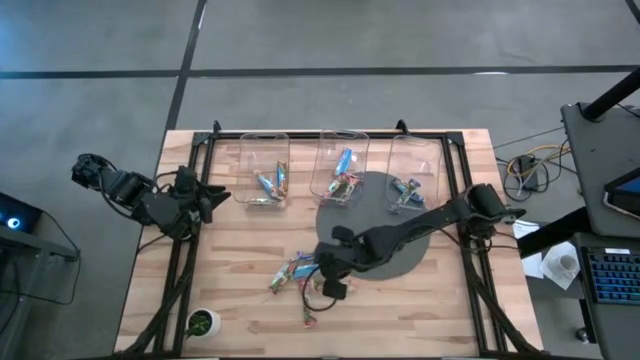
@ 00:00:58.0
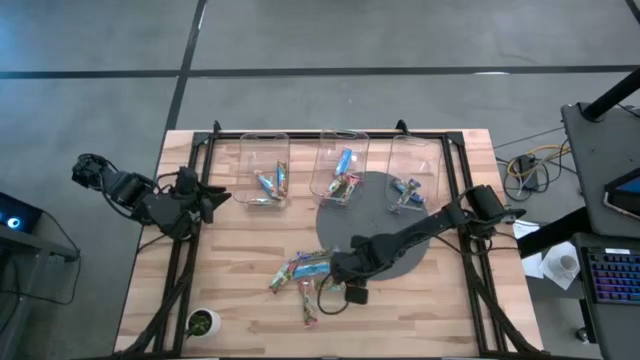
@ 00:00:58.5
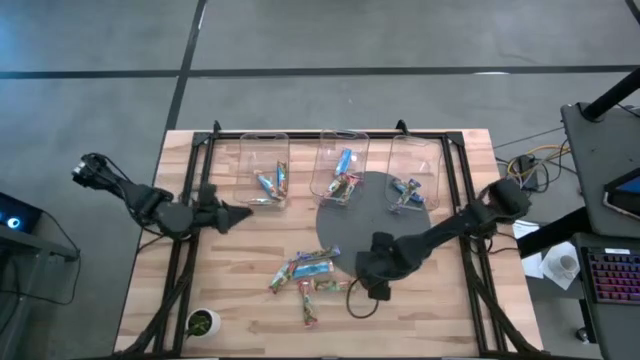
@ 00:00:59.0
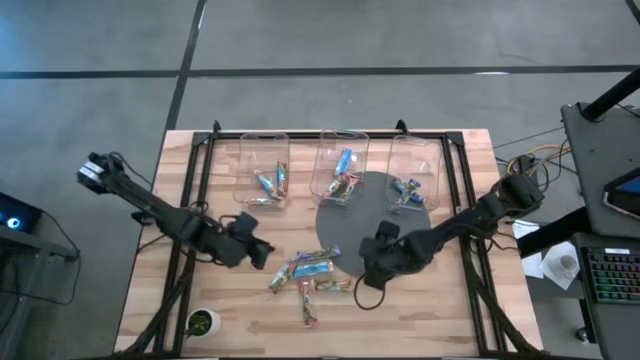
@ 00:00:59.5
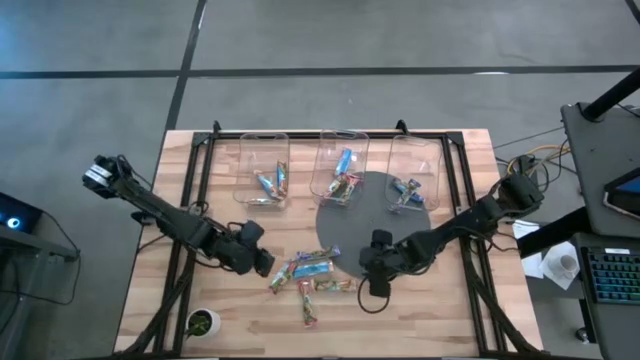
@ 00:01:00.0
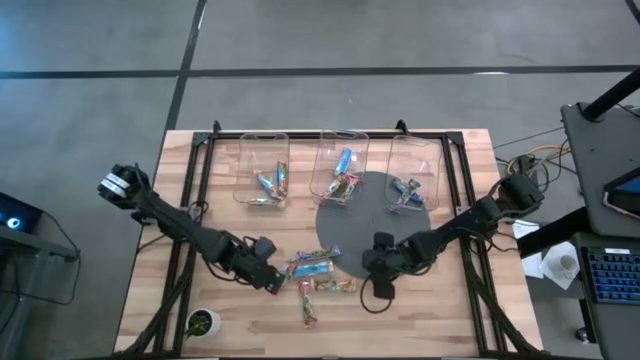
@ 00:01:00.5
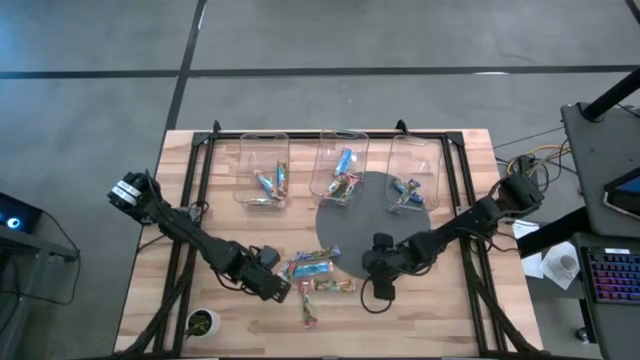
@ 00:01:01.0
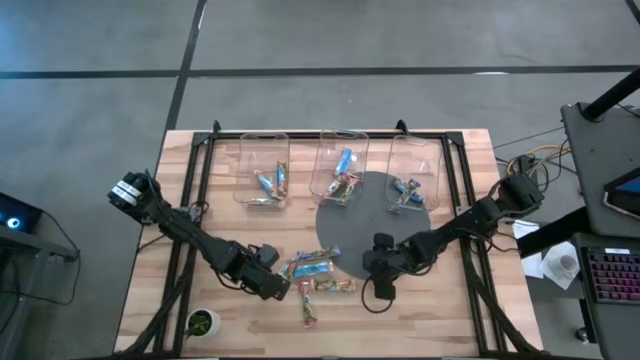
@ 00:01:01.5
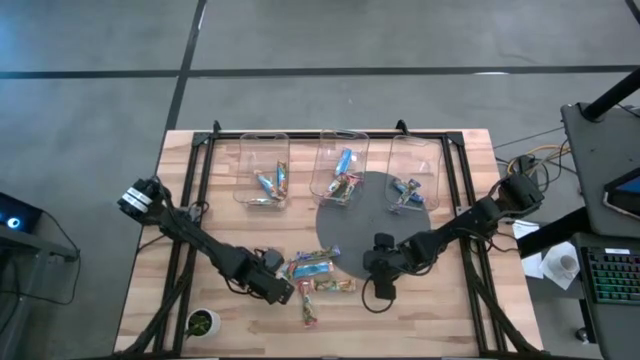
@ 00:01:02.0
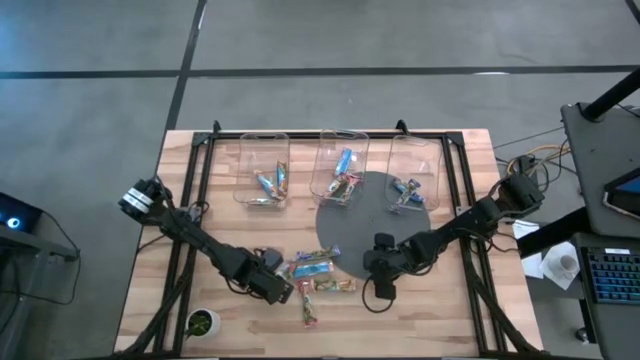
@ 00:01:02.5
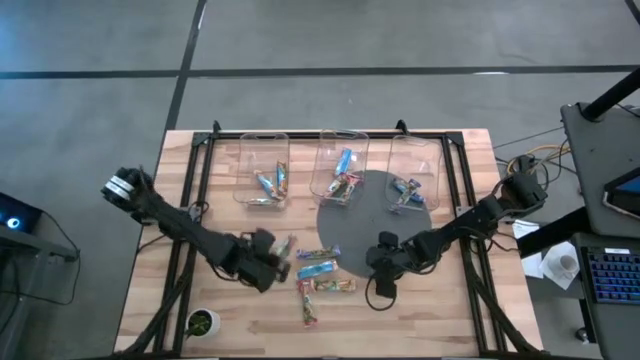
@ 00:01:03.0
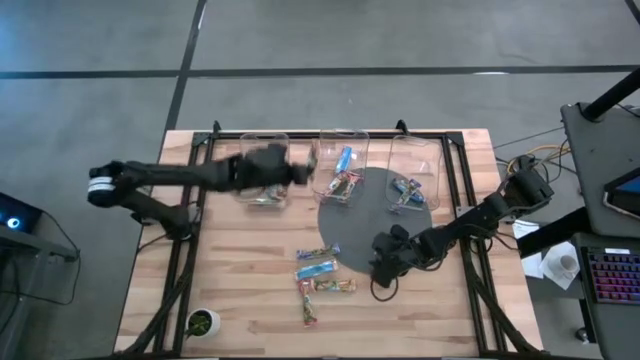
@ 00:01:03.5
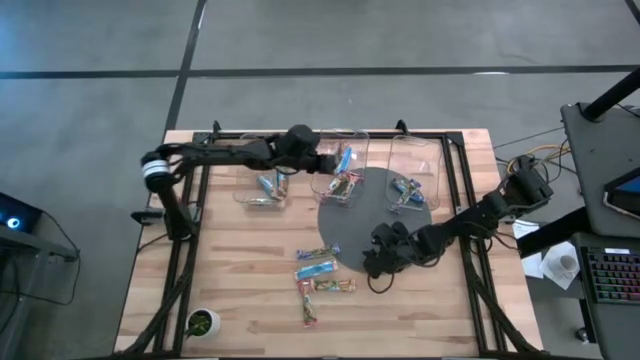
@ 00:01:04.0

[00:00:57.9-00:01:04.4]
Task: Pick and place Granola Bars by type
Put the red granola bar into the middle transparent bin

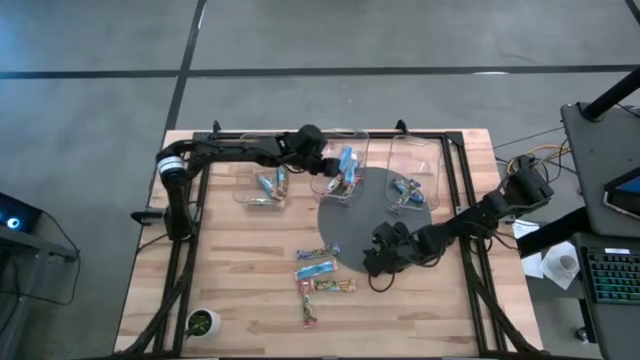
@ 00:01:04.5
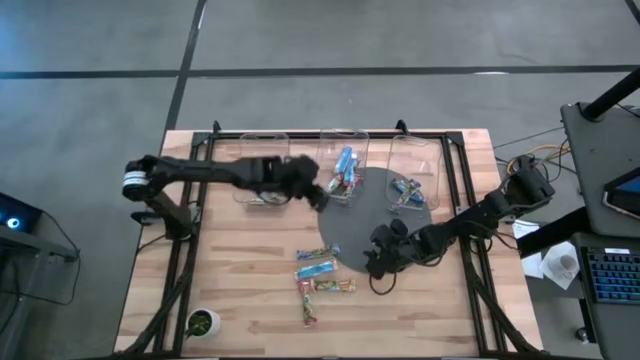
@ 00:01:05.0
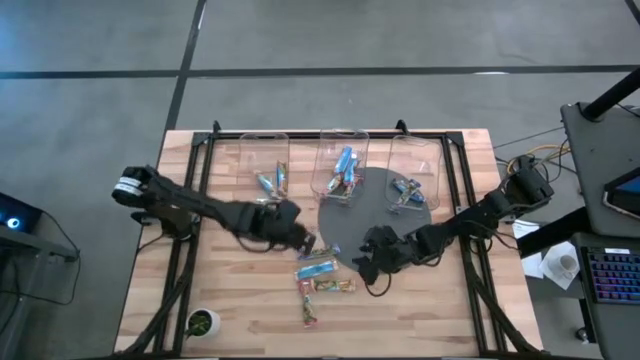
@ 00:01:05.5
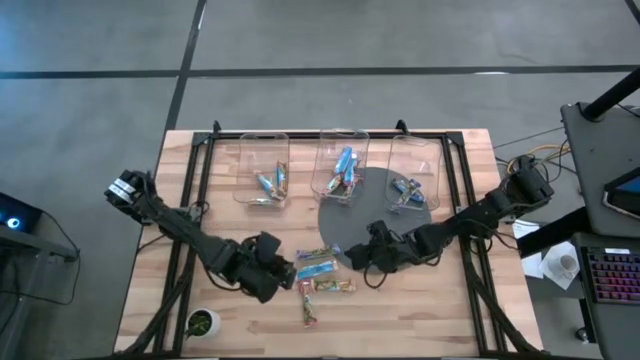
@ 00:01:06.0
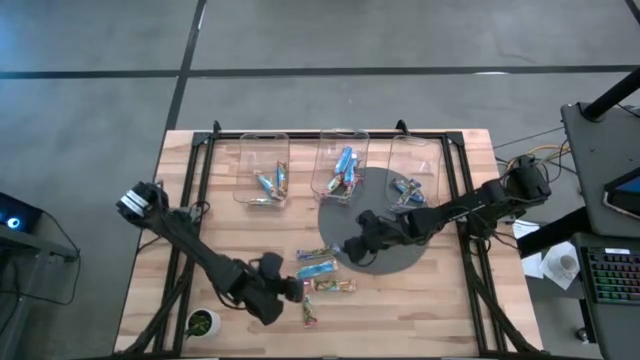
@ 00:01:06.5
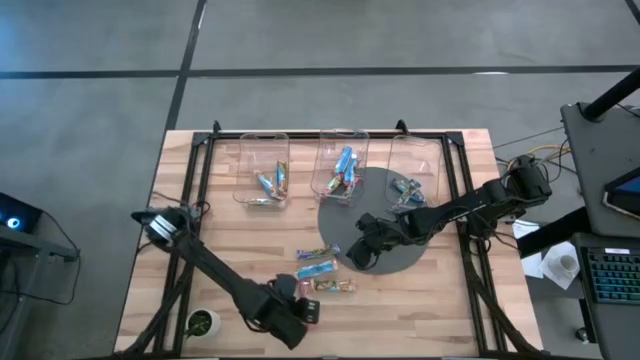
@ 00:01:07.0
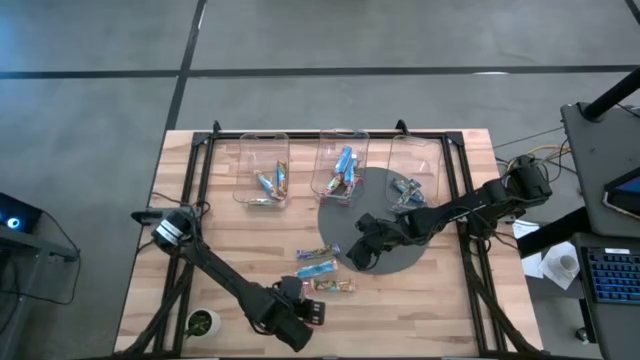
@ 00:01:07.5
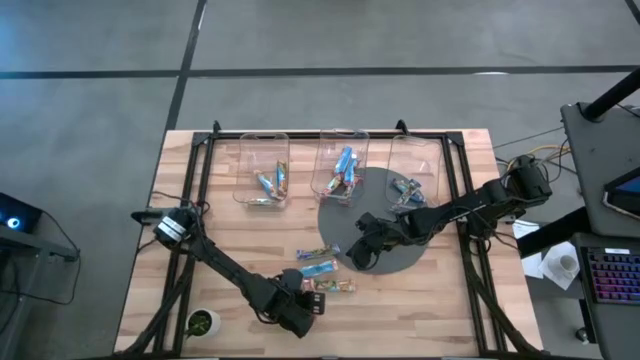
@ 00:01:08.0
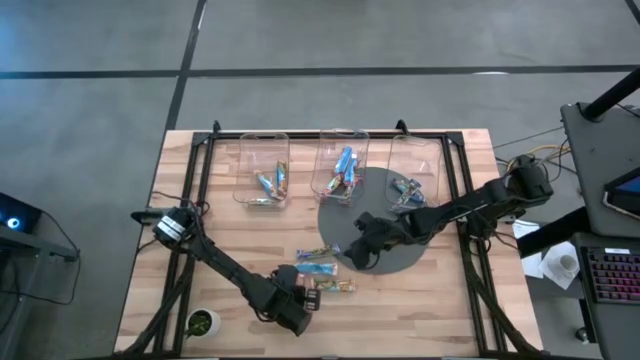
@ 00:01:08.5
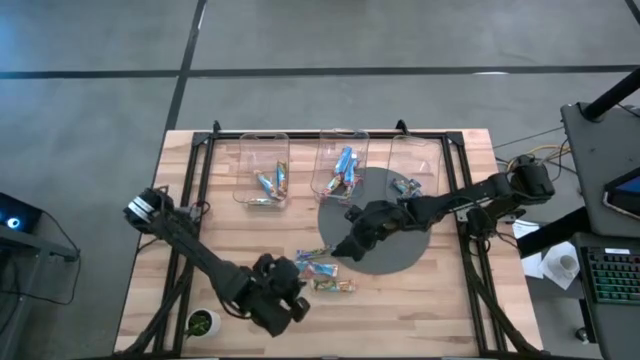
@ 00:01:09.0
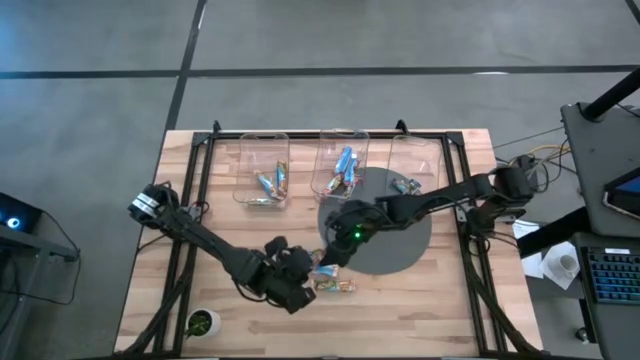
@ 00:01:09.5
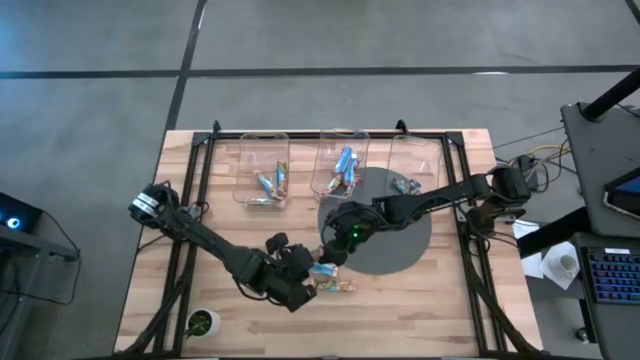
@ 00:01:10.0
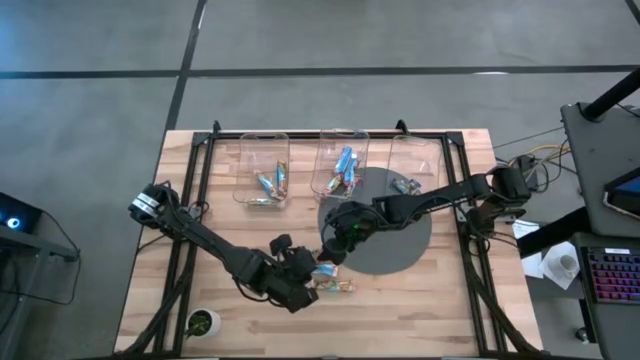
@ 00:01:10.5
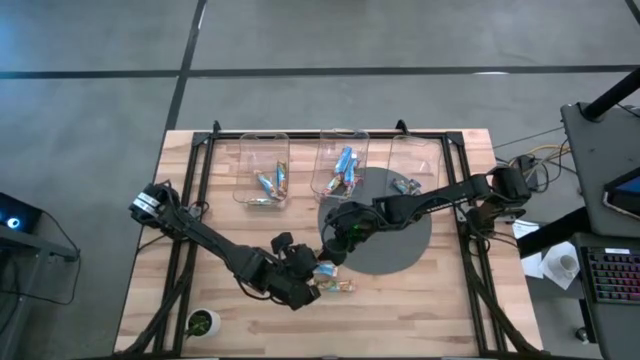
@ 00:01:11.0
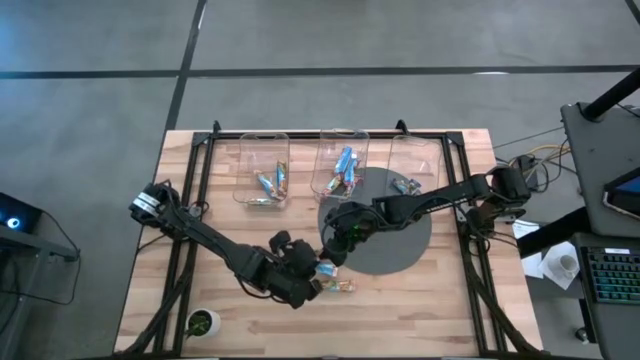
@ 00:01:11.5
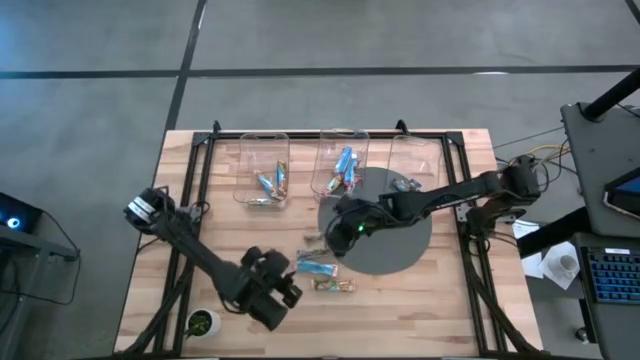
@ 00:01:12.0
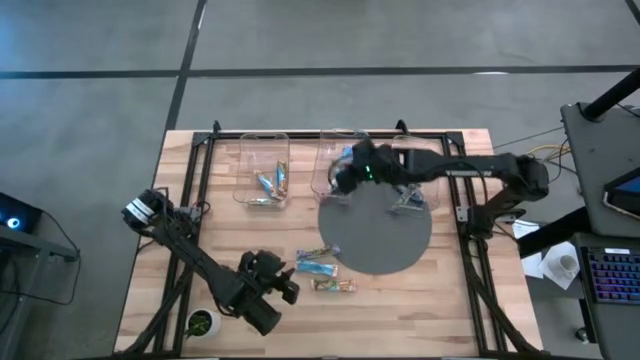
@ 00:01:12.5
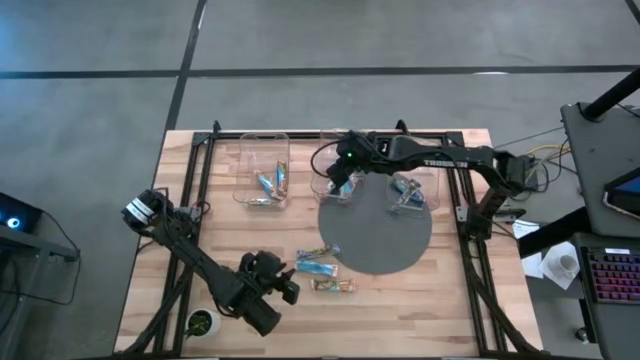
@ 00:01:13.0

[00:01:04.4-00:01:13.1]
Put the red granola bar into the middle transparent bin

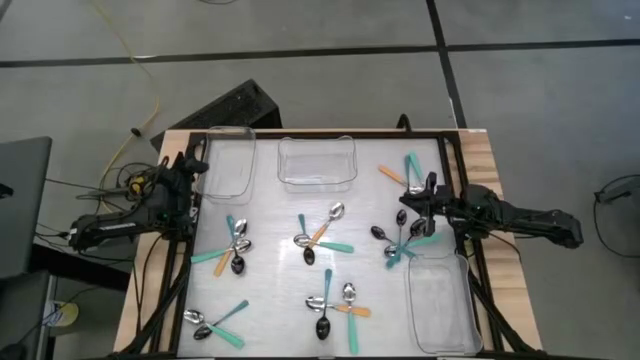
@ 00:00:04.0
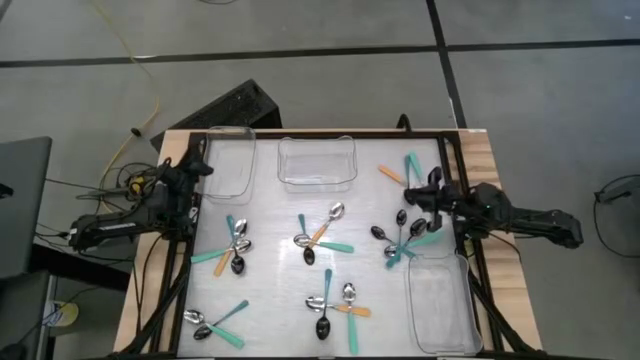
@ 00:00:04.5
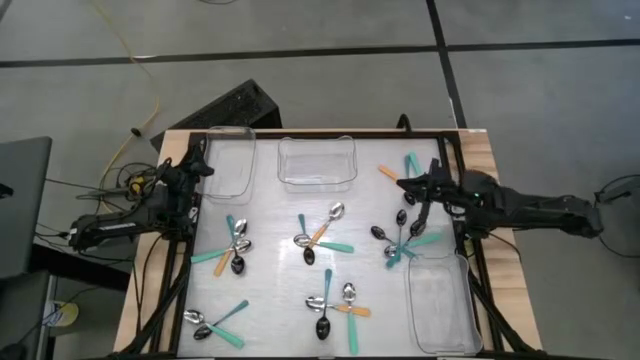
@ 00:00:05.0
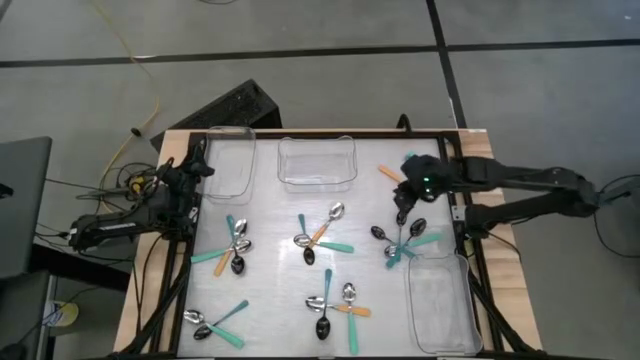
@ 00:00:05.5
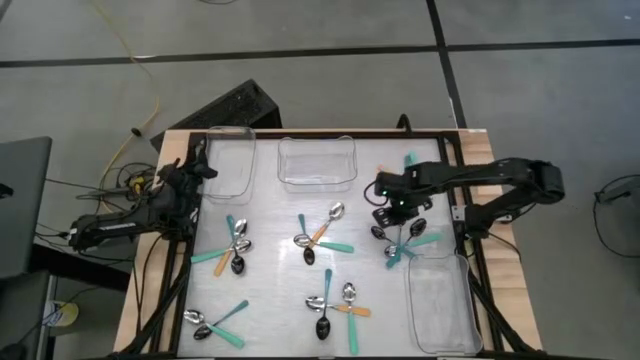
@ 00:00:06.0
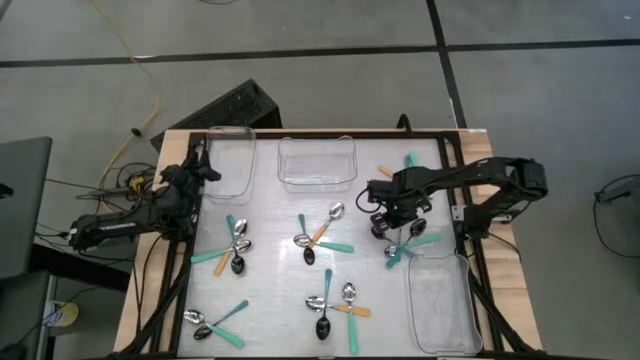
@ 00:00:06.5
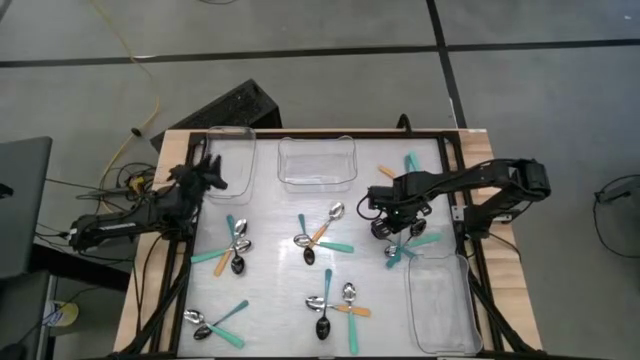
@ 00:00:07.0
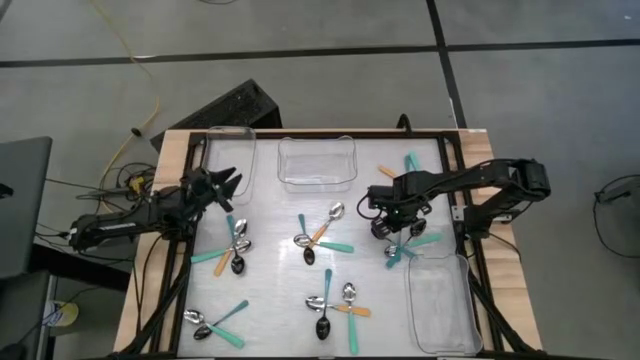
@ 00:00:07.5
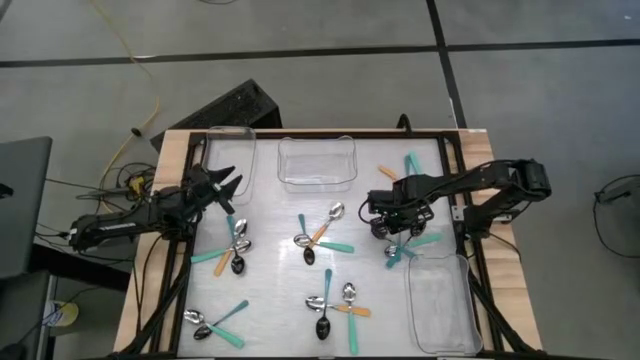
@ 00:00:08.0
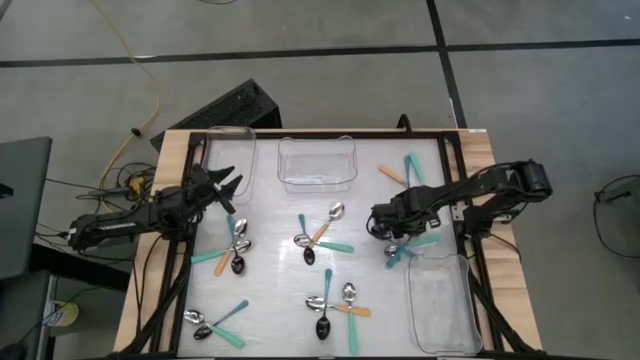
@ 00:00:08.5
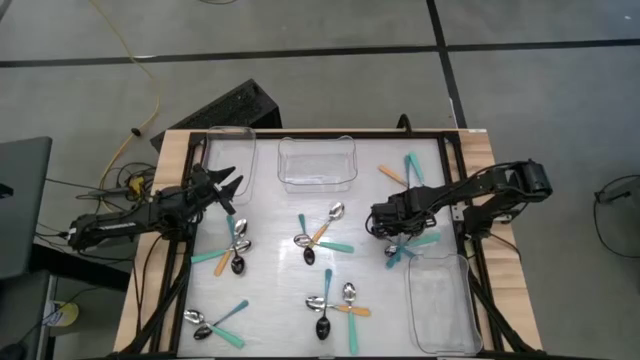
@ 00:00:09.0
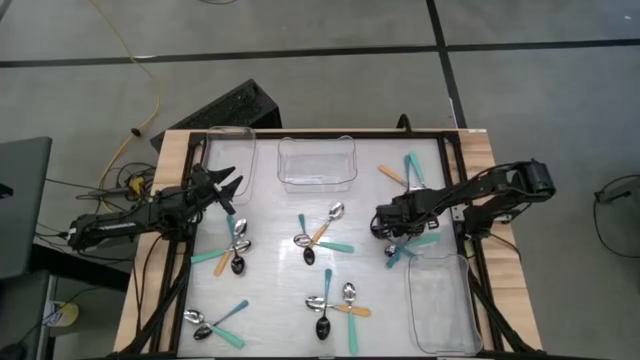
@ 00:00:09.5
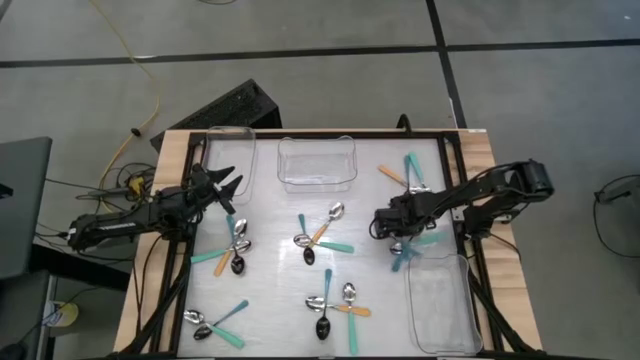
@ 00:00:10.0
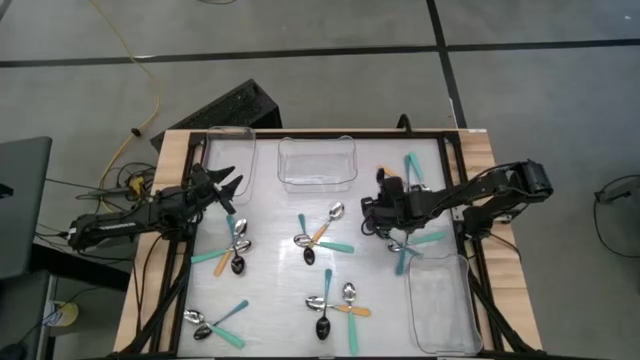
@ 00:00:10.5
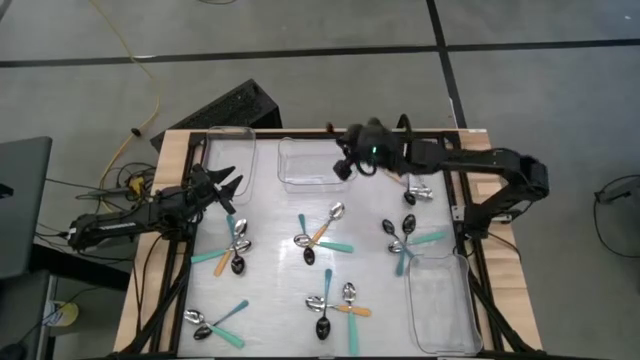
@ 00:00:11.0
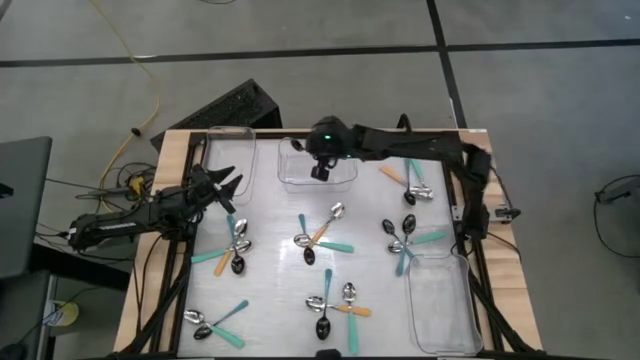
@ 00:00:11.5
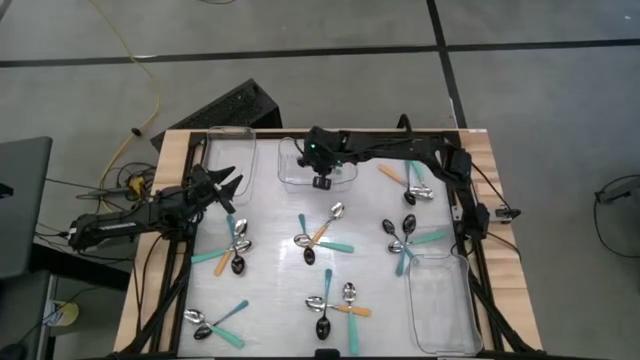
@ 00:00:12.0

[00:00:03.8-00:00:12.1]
Task: Sort silverware by color (type)
Put the blue spoon into the top middle transparent bin
